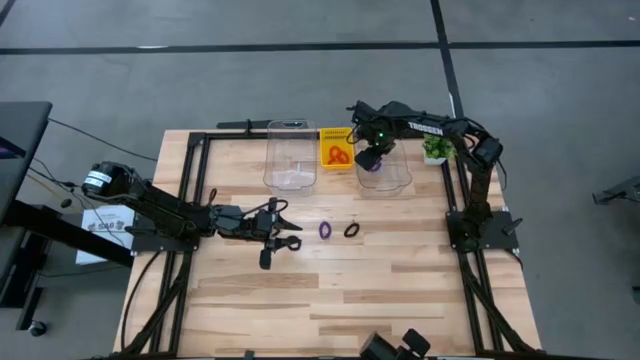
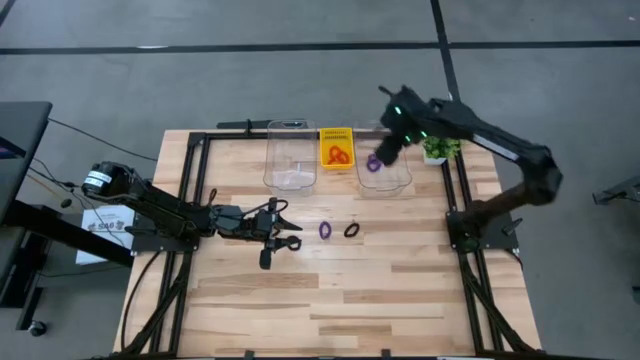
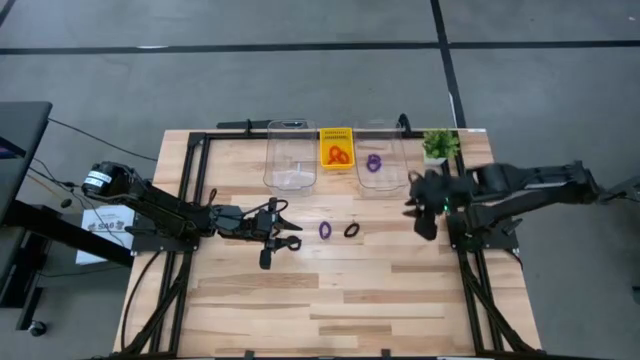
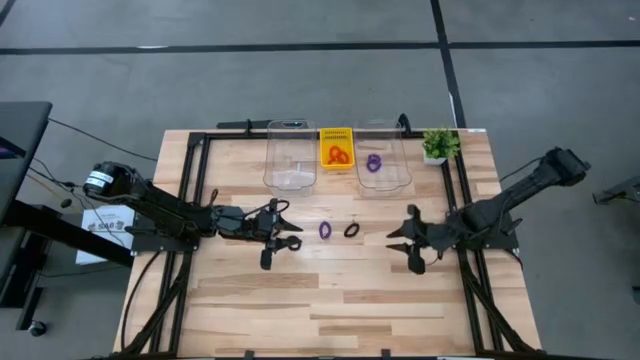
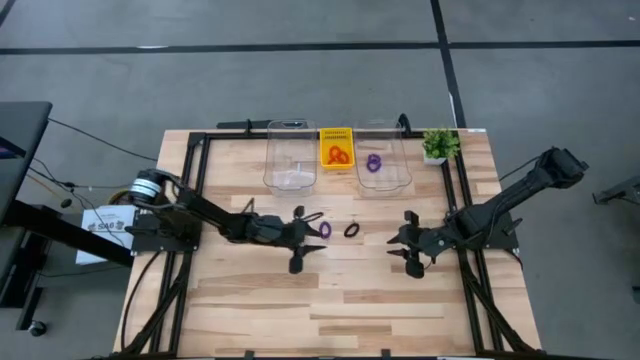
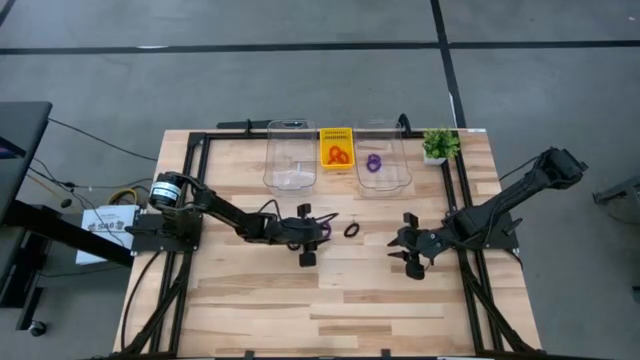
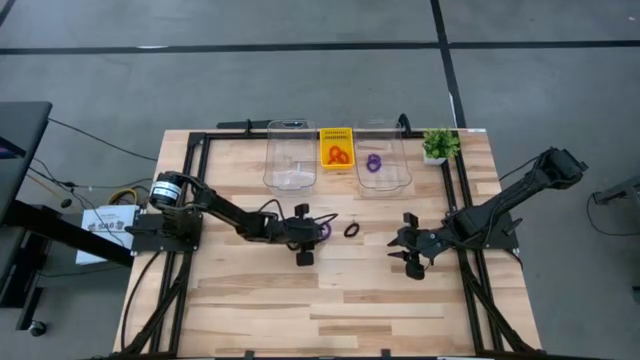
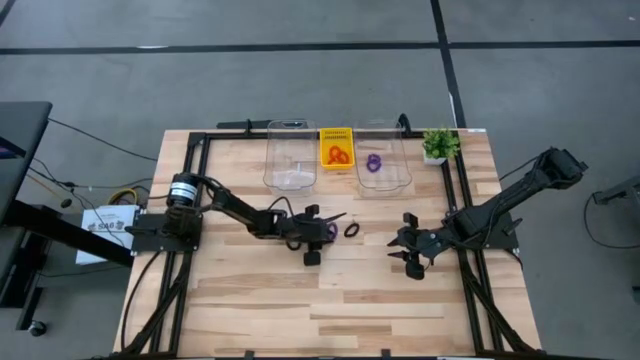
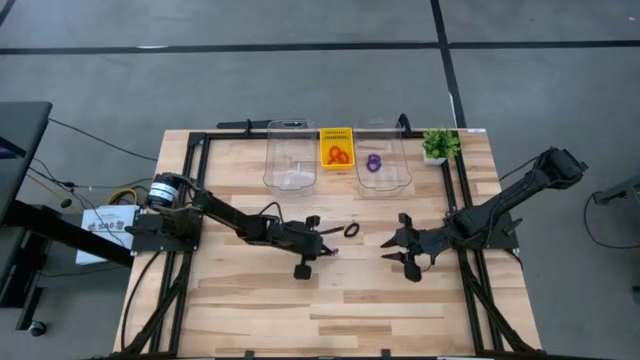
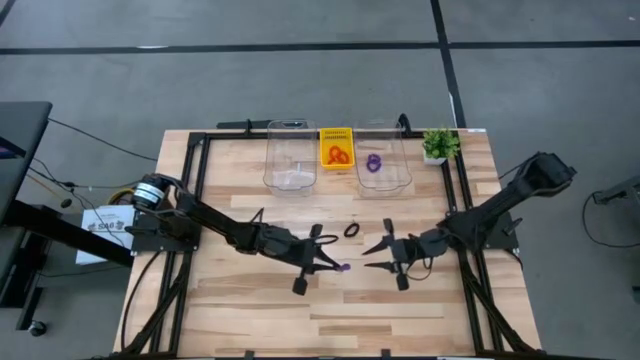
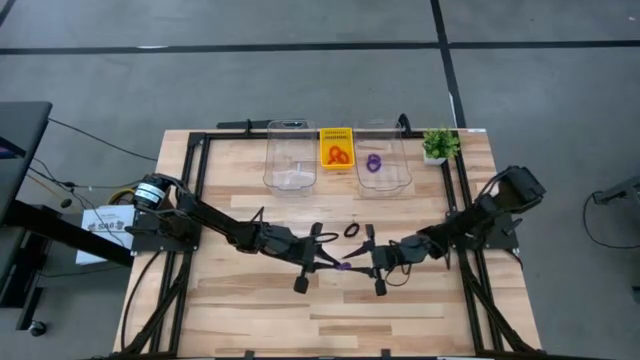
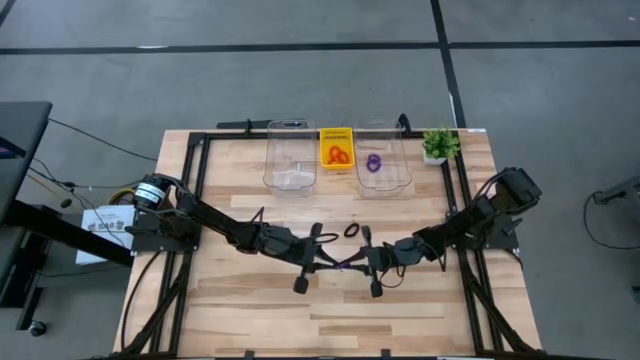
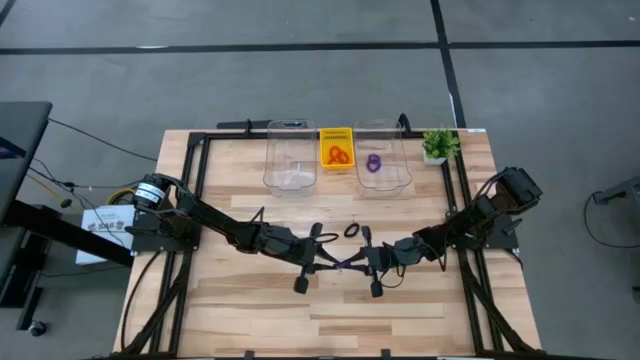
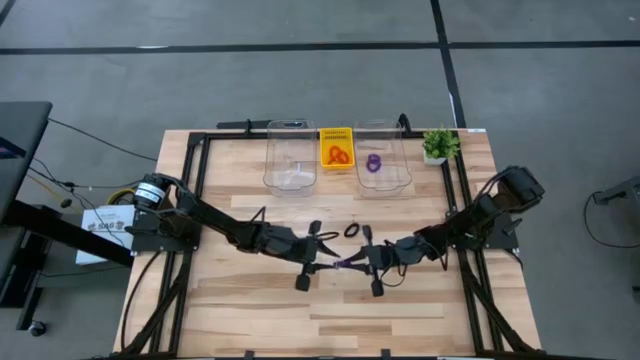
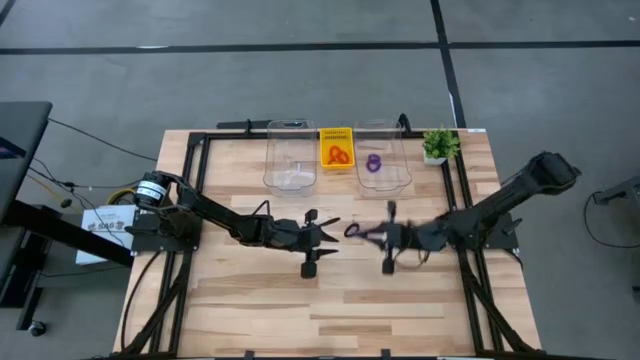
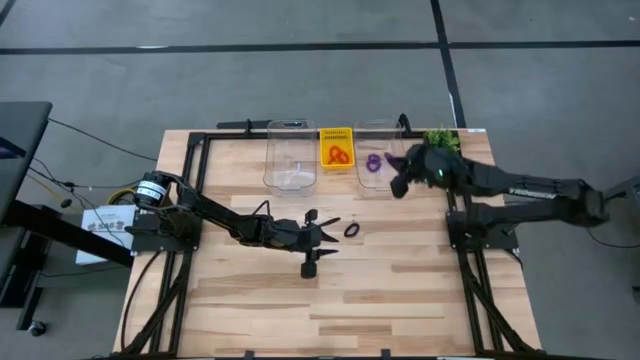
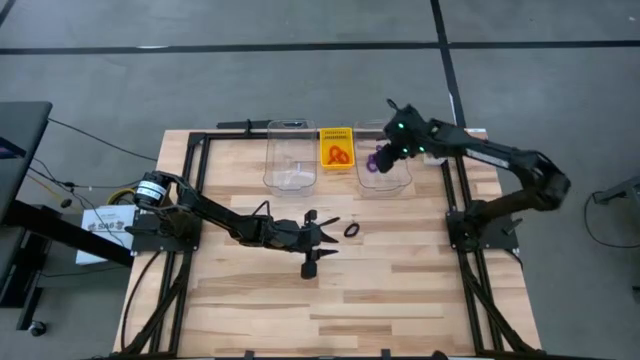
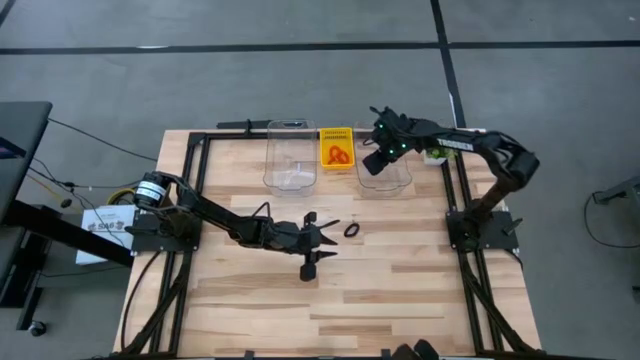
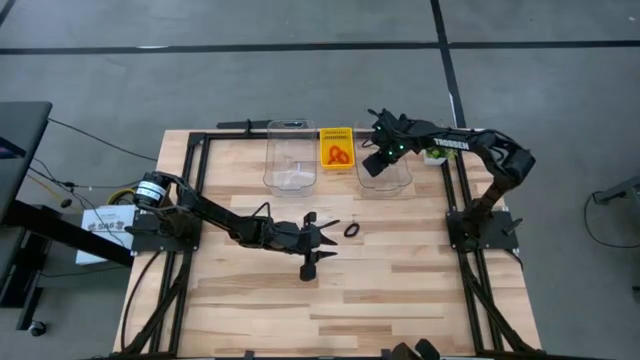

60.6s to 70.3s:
Task: Sort spring keychains
Put the purple spring keychain into the right transparent bin

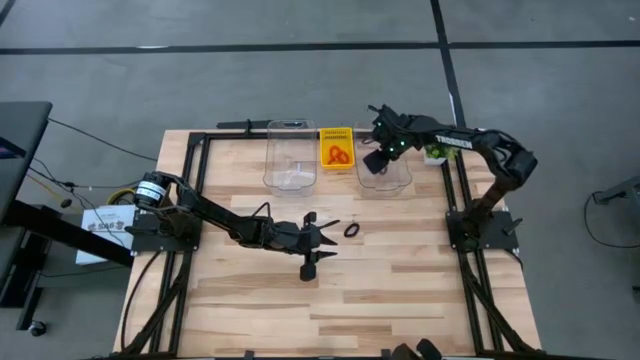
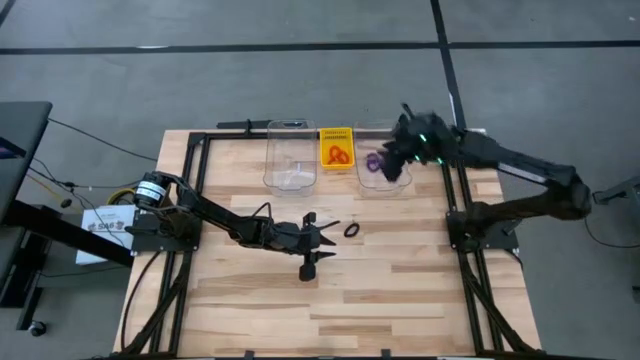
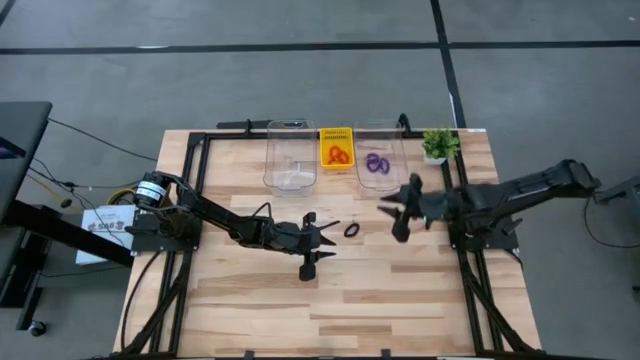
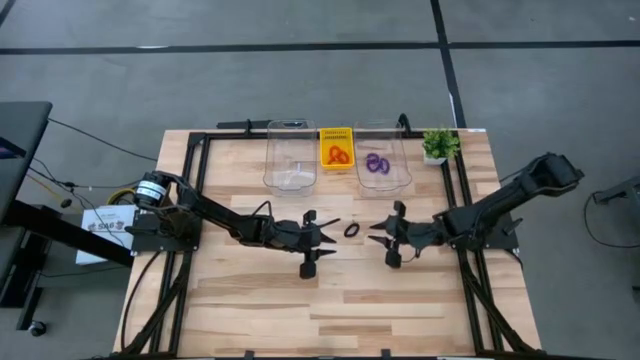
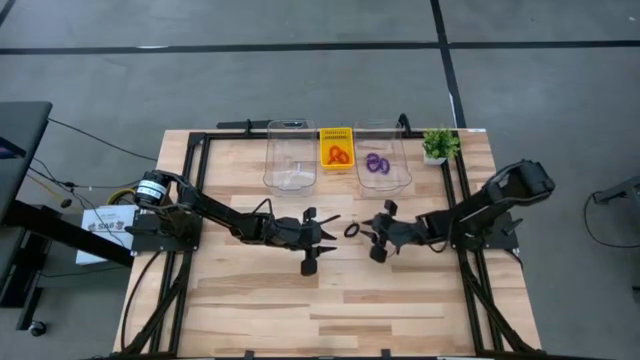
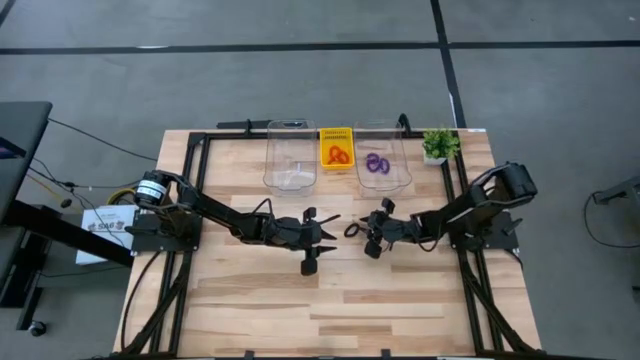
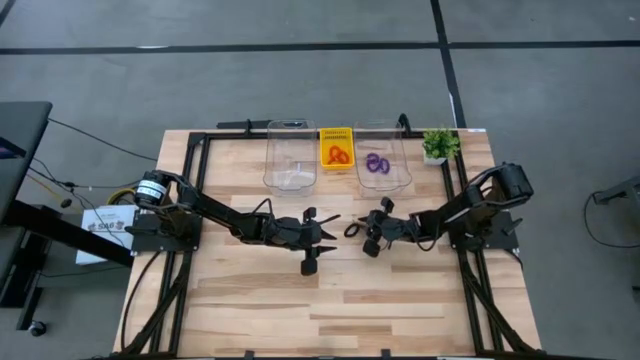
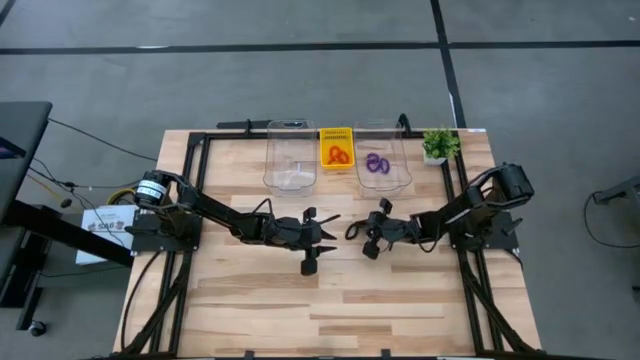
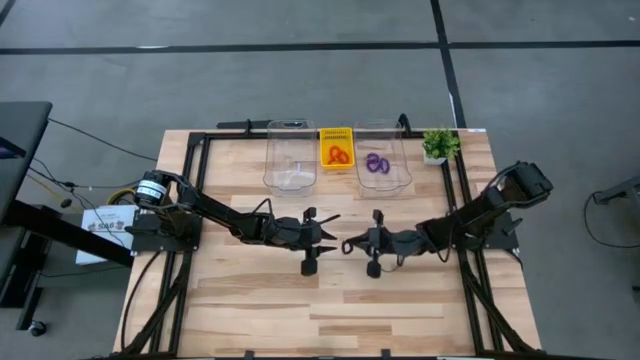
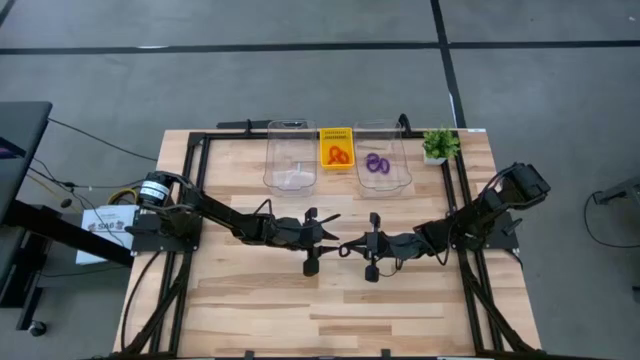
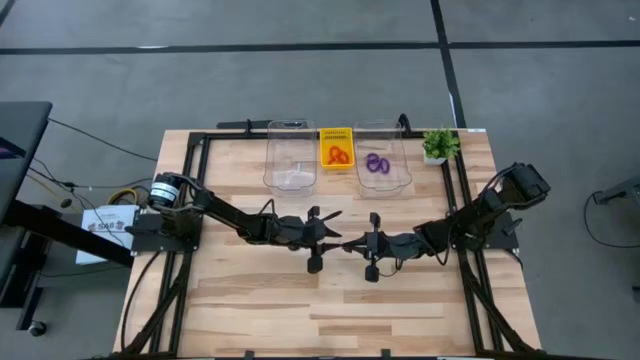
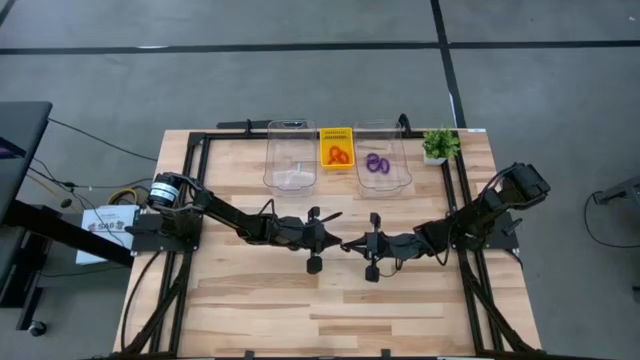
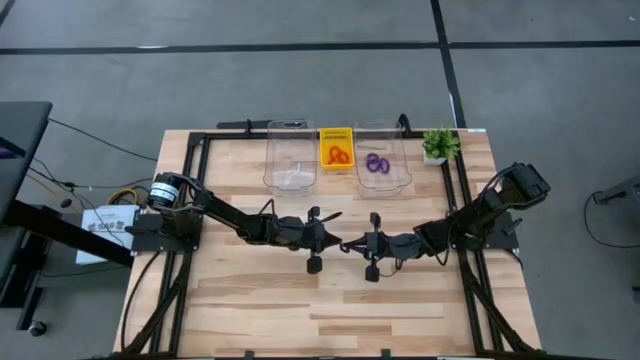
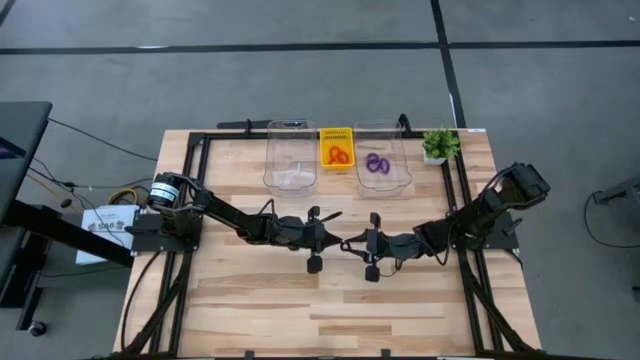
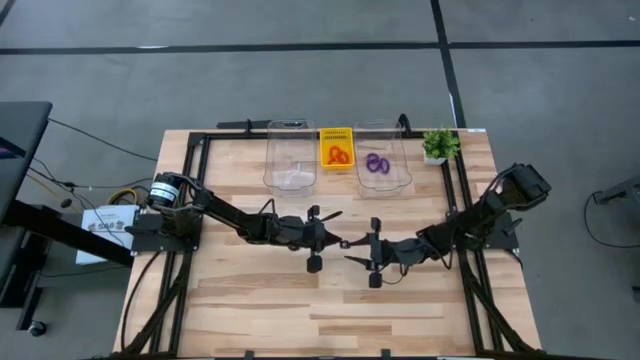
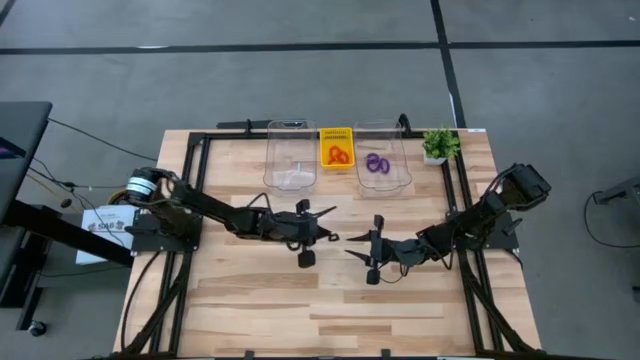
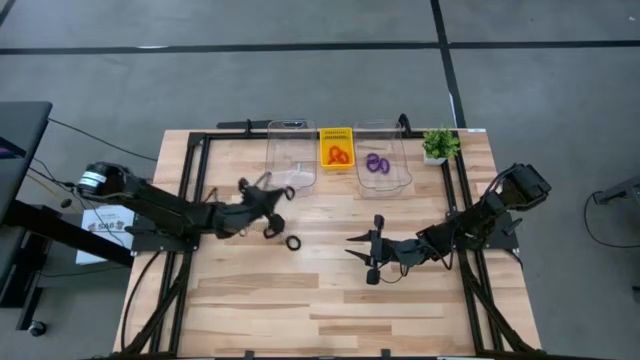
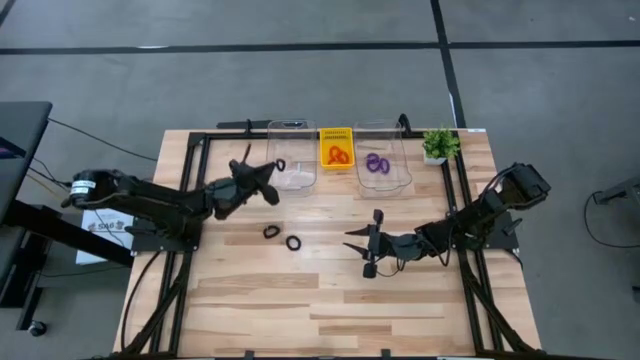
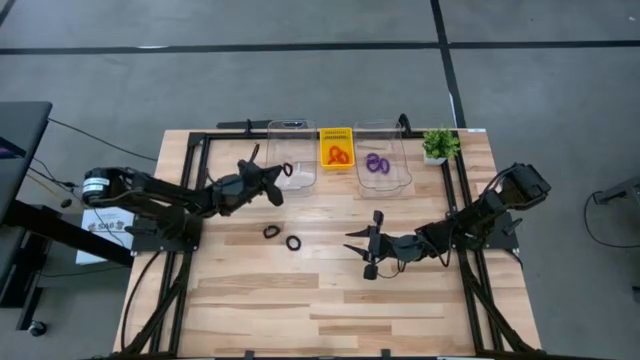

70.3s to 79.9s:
Put the right black spring keychain into the left transparent bin

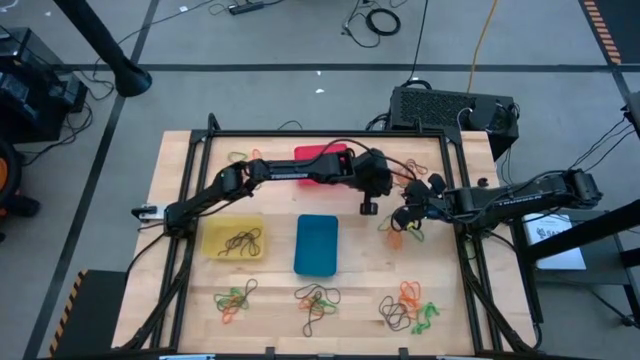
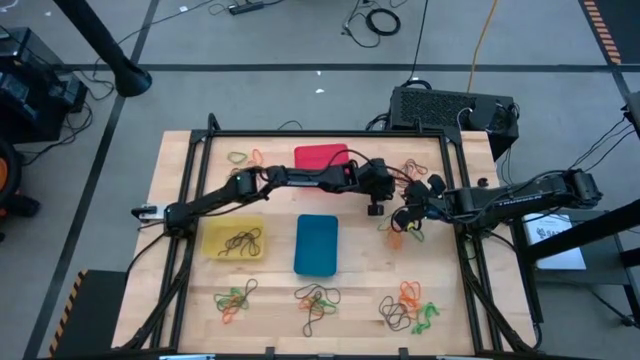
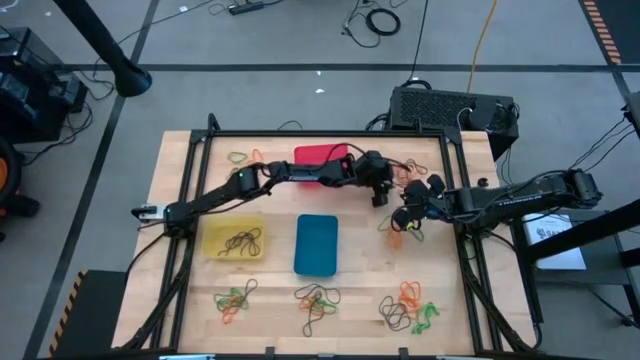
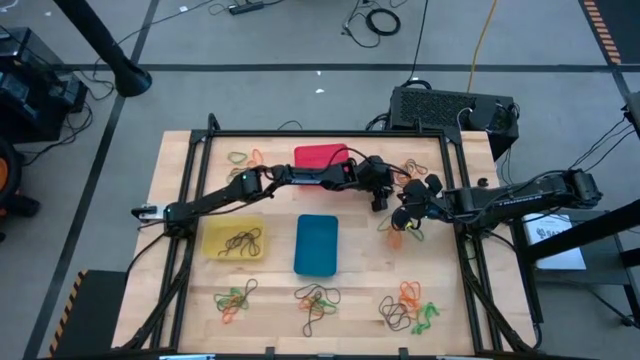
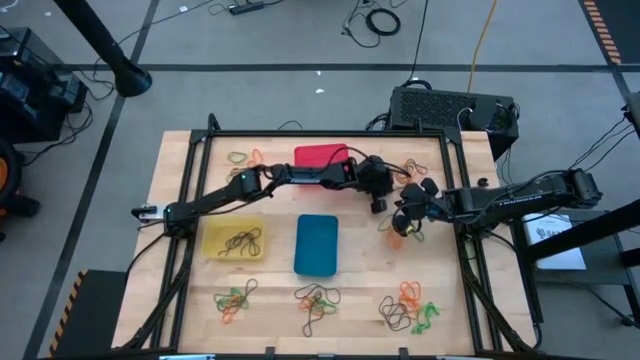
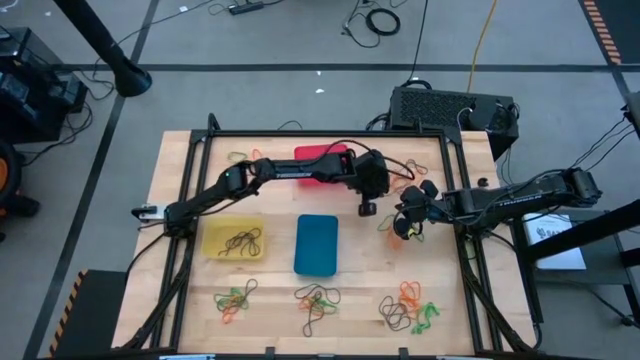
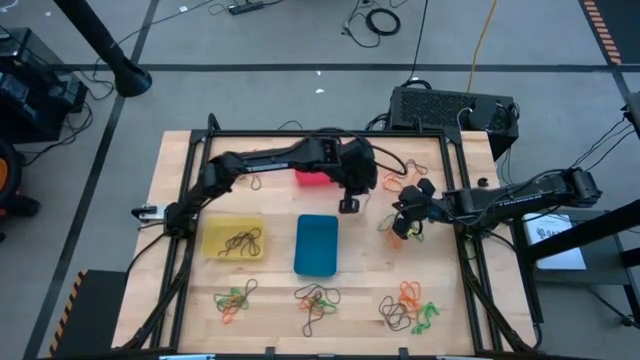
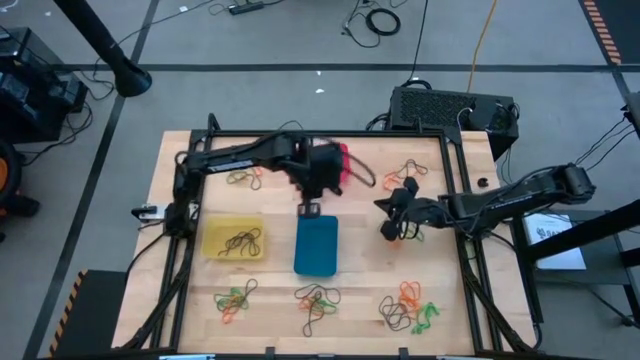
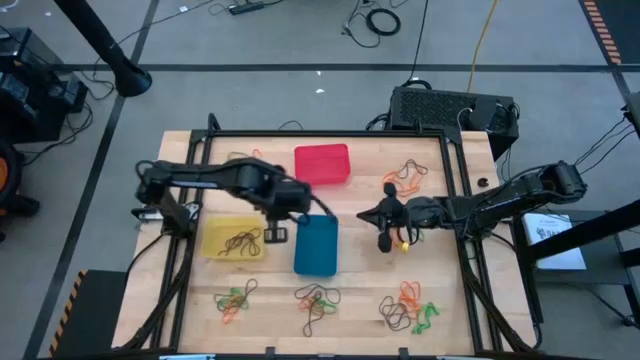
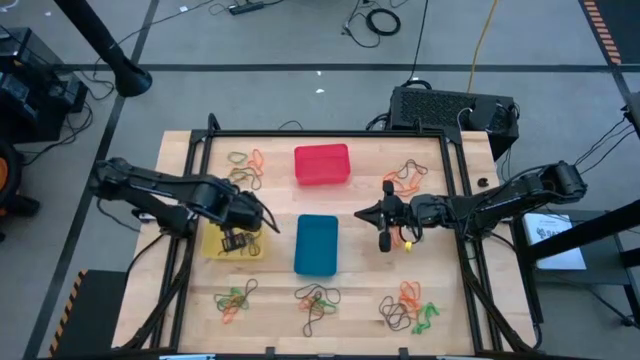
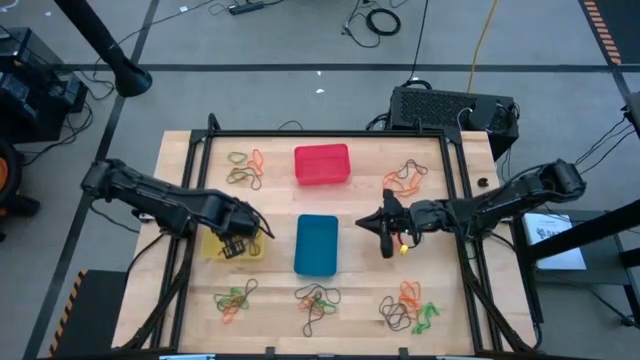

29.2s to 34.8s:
Task: Sort rubber bands into baskets
Put the purple rubber band into the yellow bin
